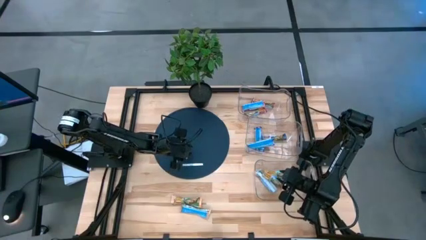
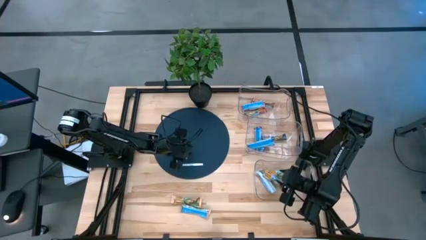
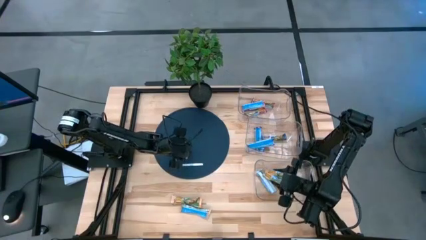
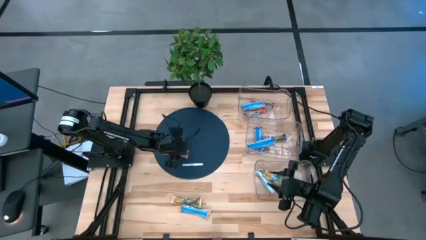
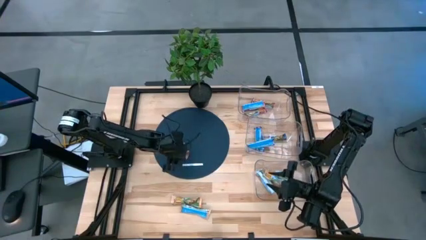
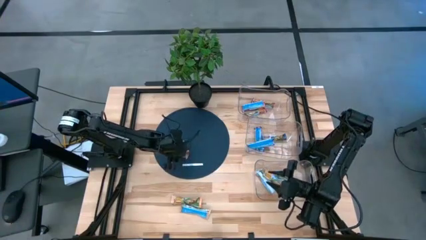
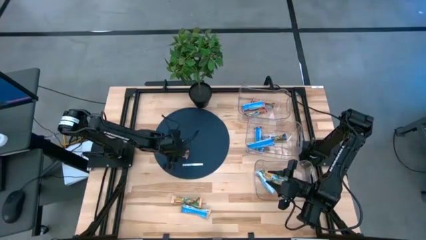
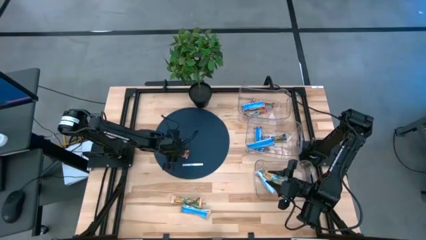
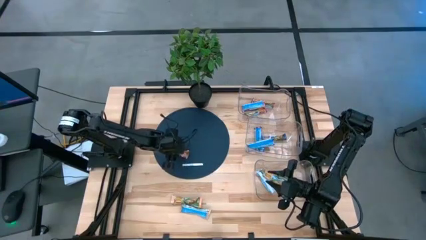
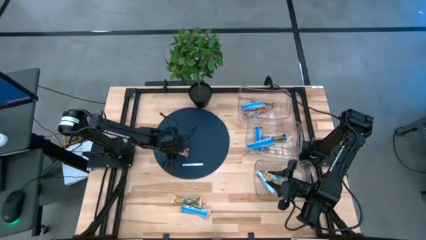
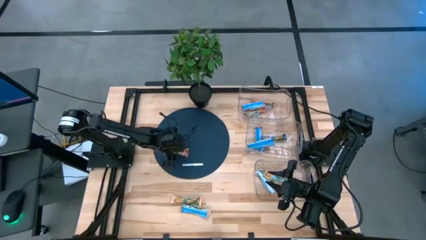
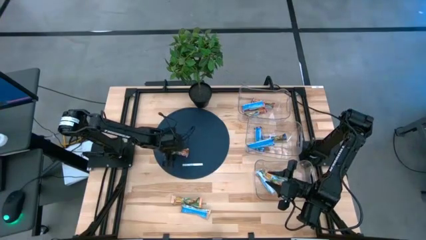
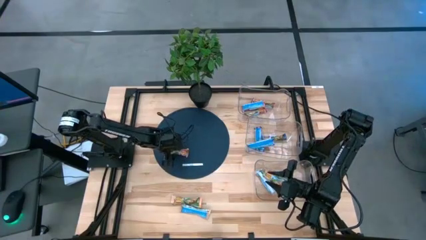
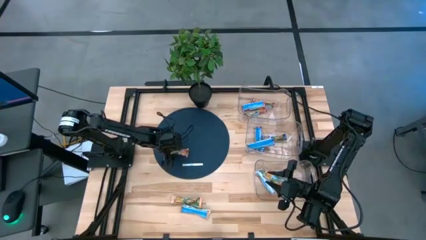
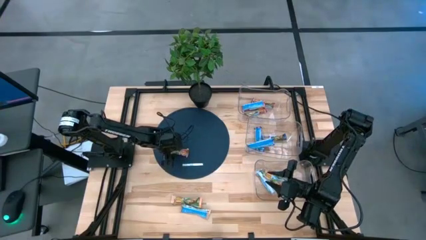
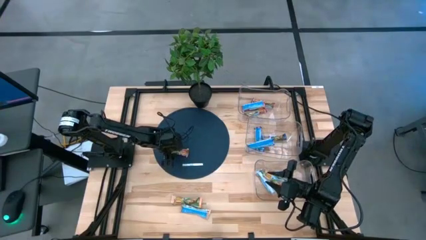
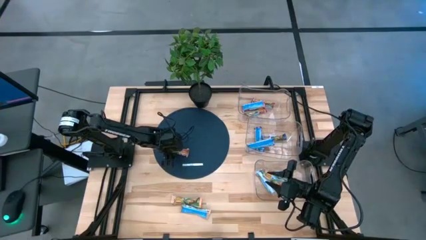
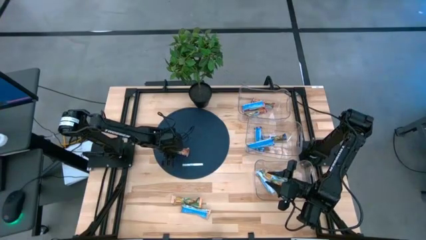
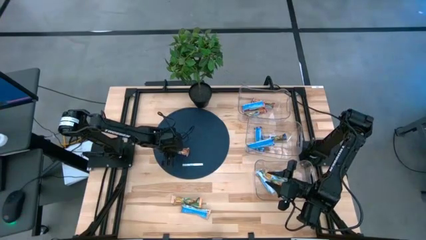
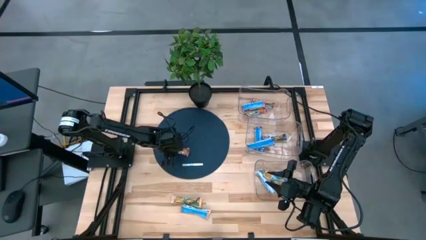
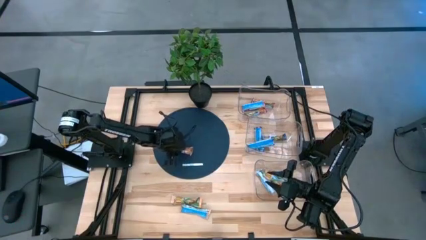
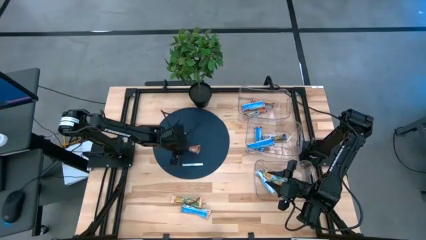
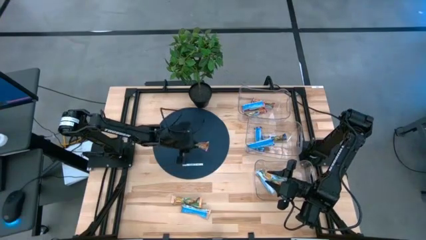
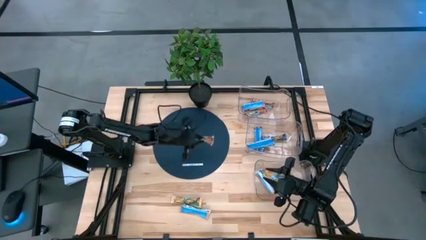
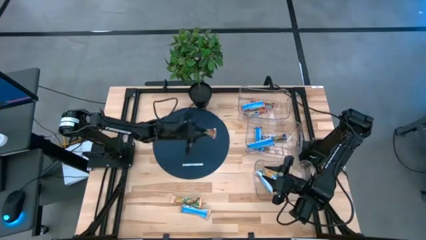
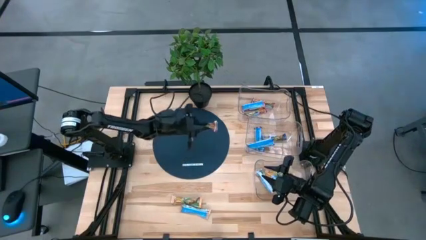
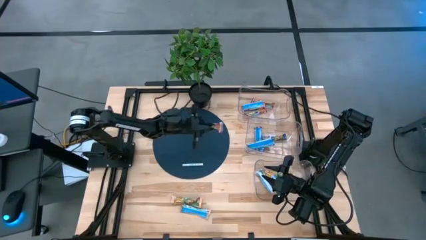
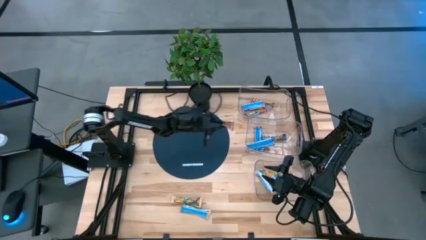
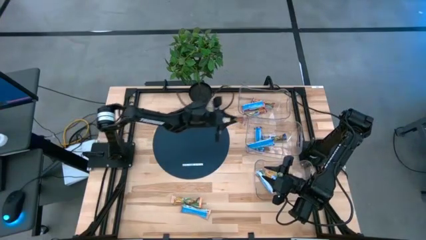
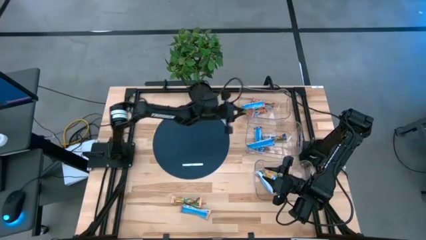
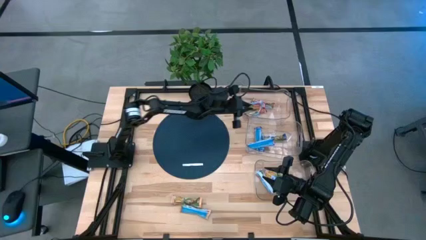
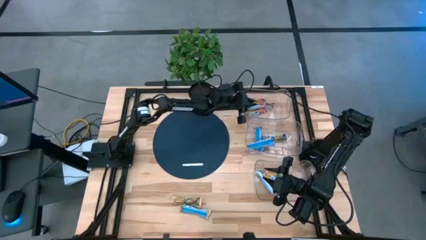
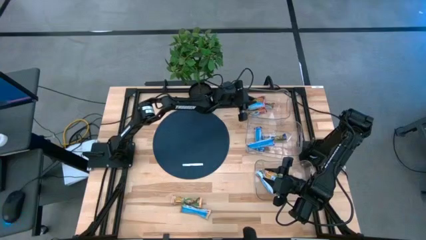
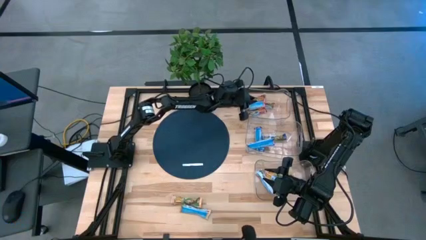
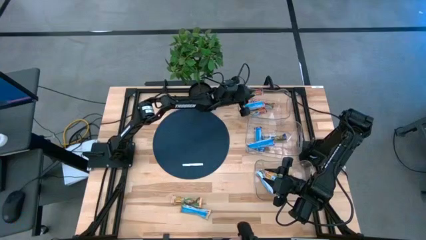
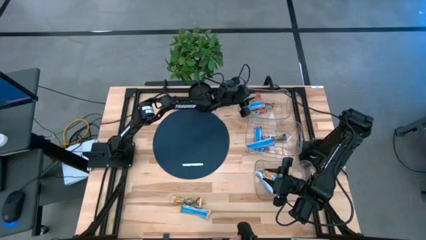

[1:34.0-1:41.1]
Task: Pick and place Granola Bars by type
Put the red granola bar into the top transparent bin

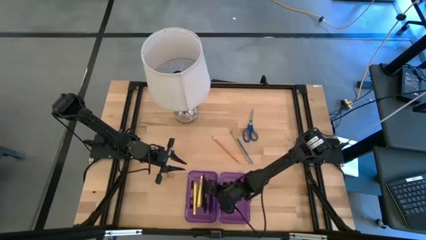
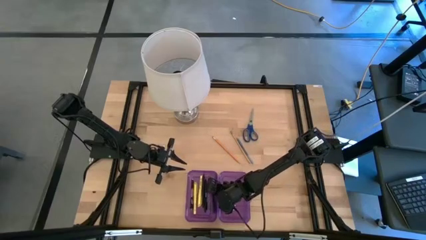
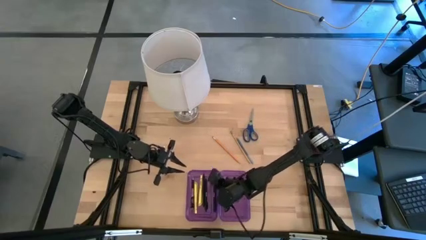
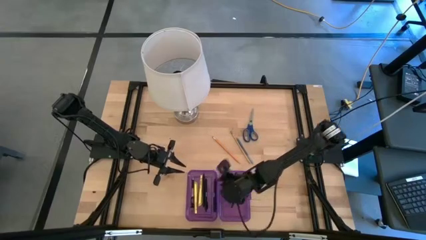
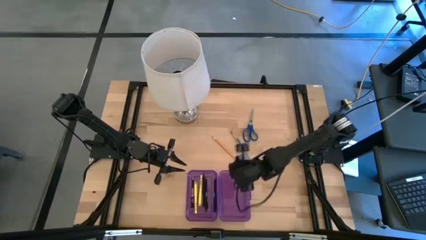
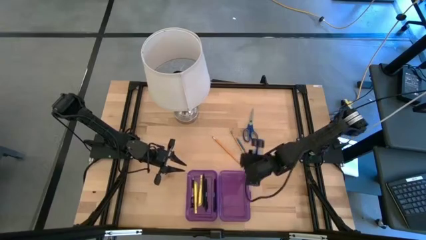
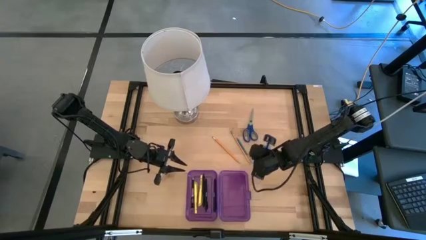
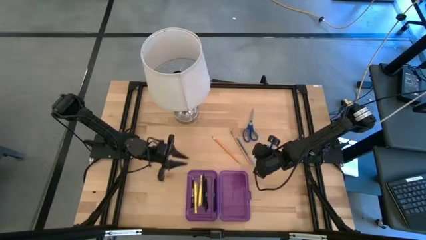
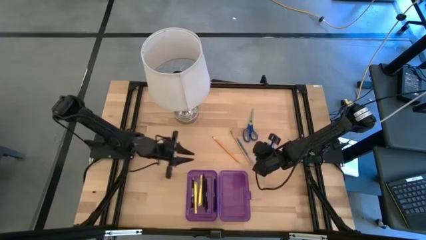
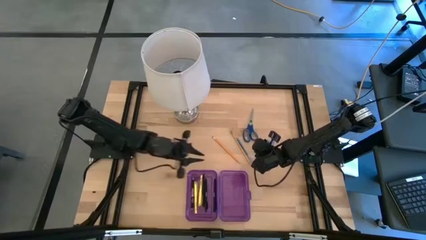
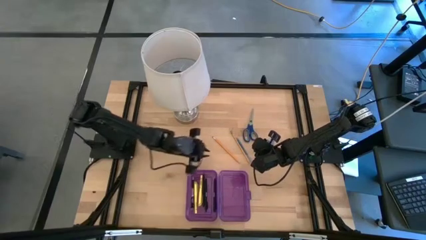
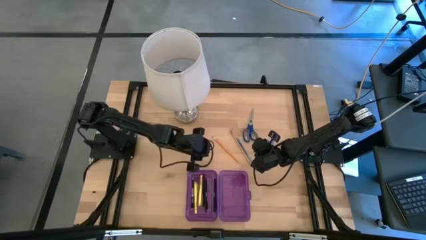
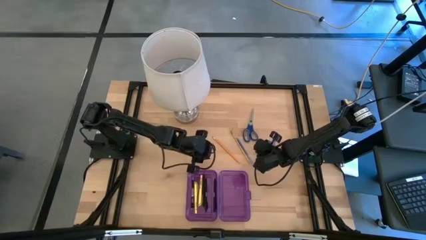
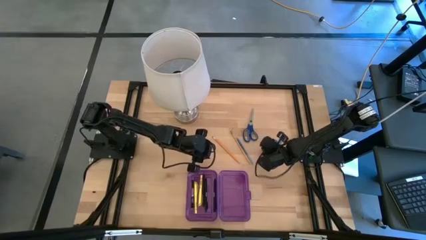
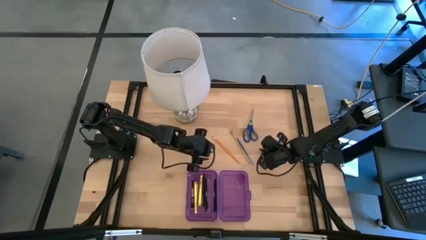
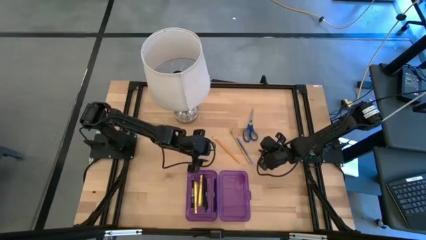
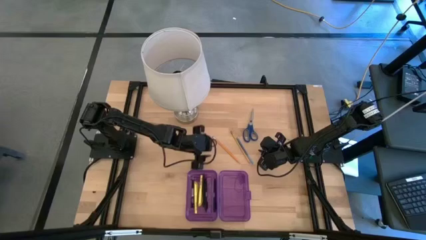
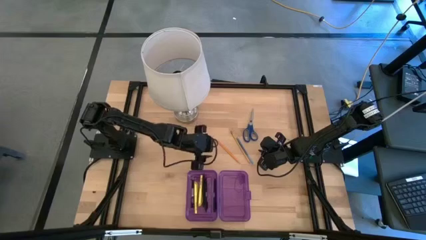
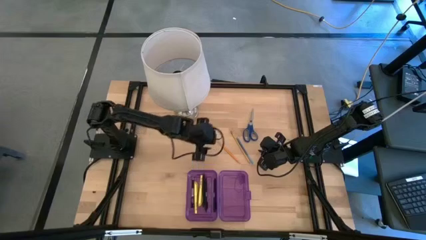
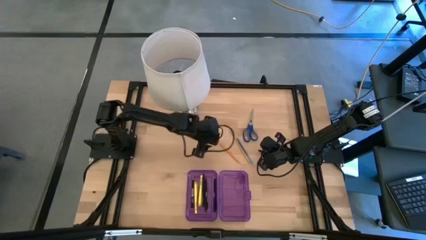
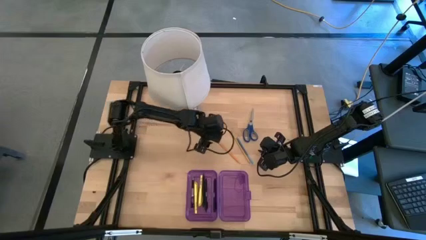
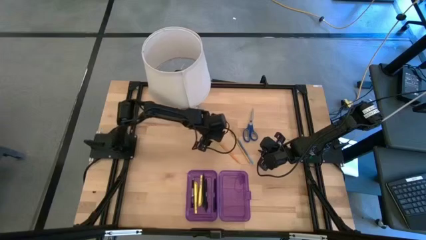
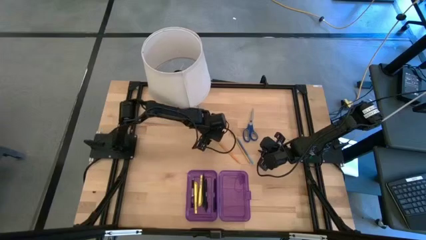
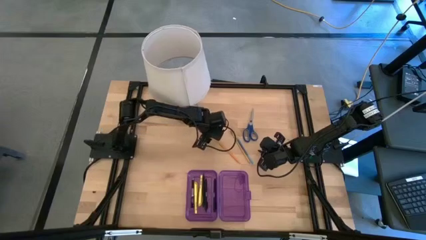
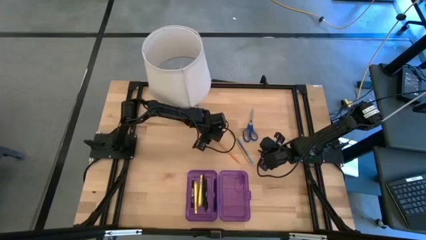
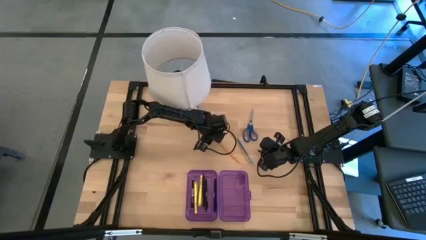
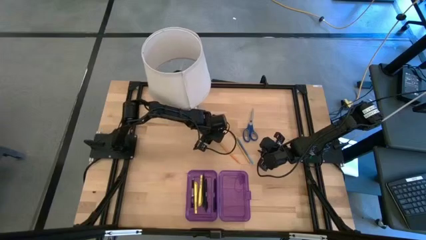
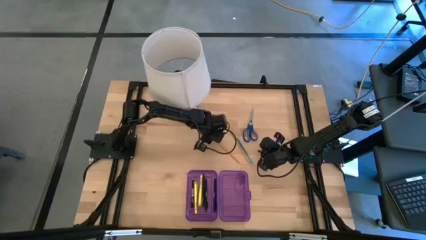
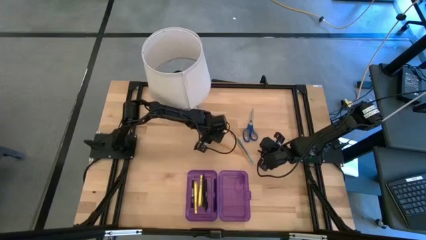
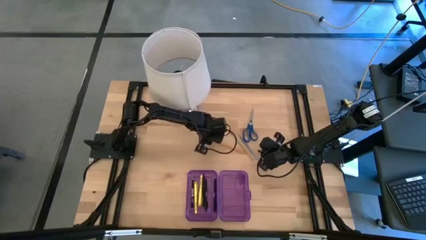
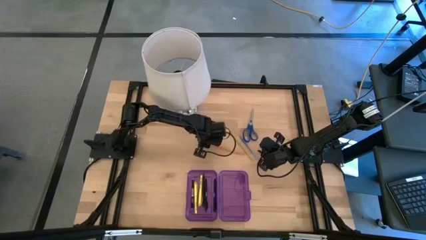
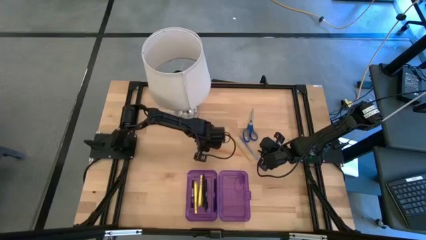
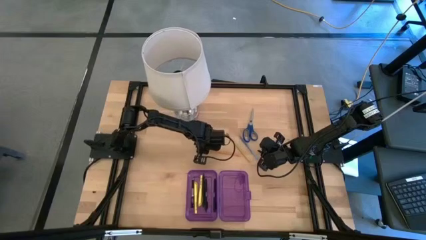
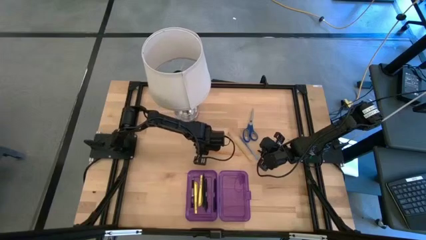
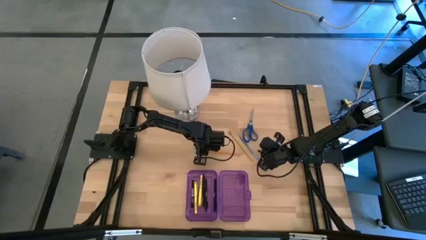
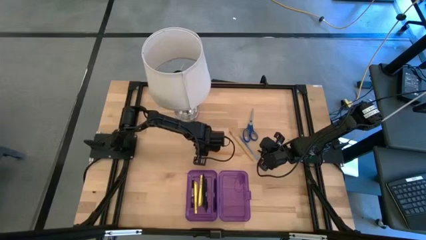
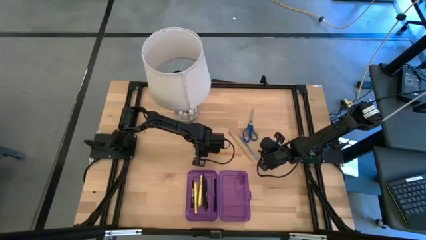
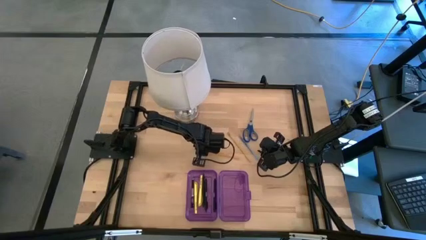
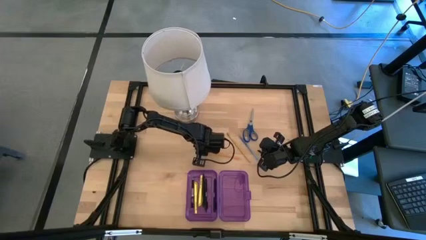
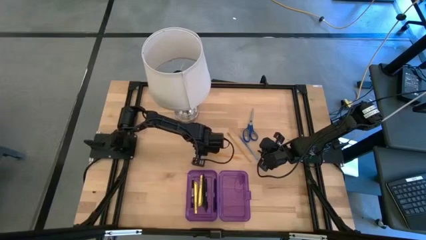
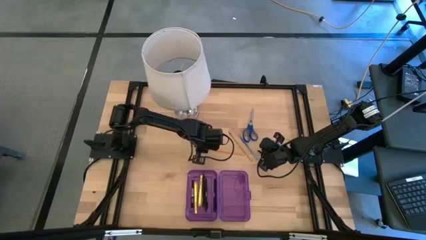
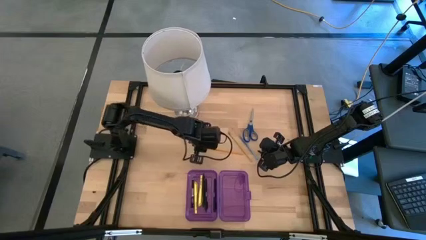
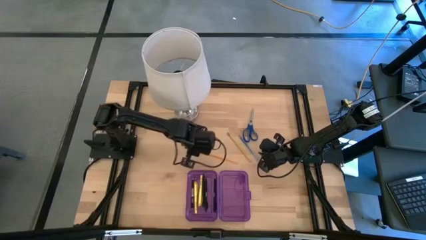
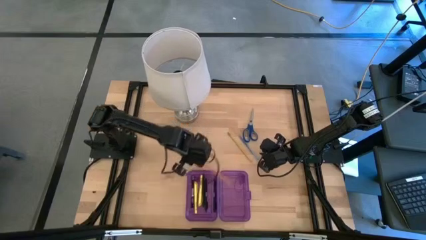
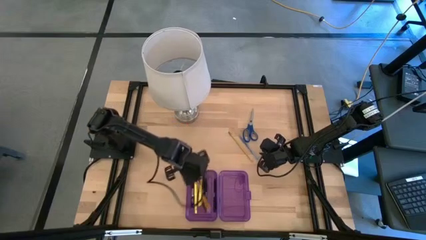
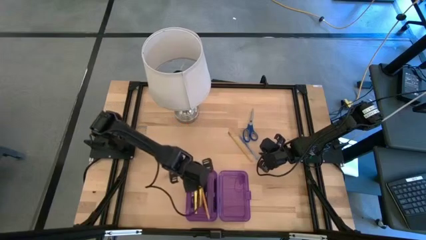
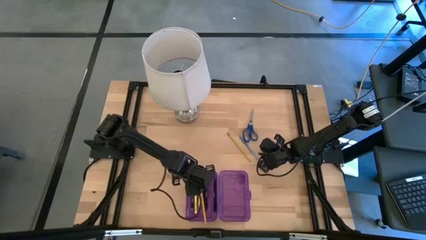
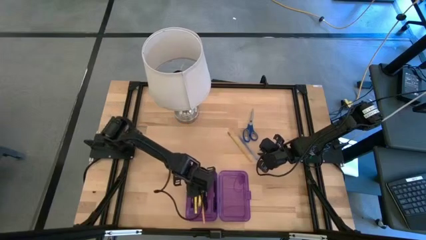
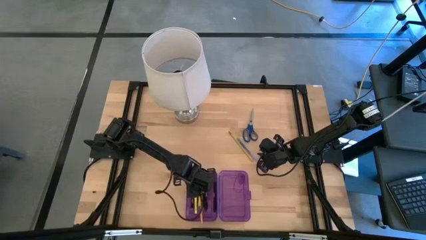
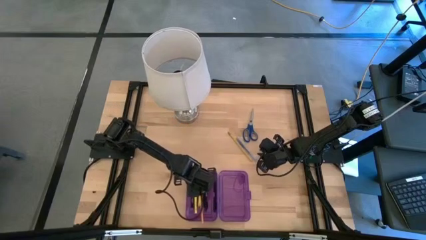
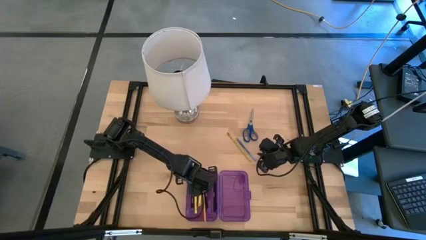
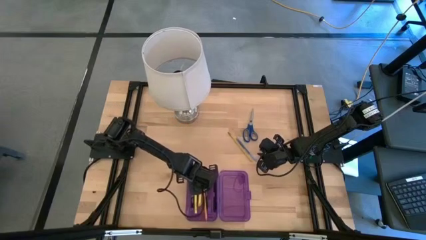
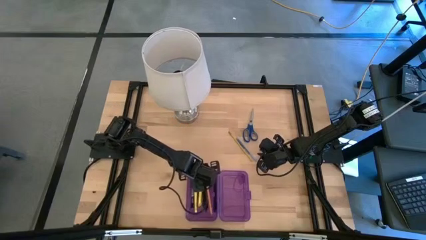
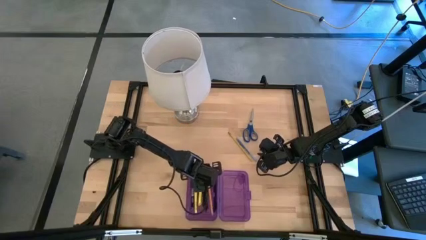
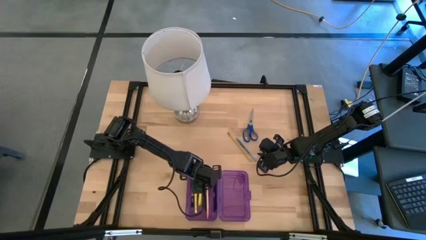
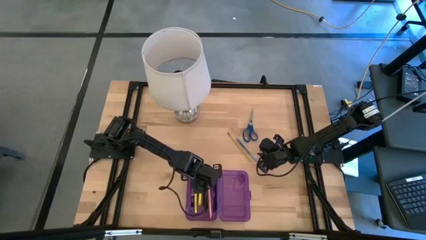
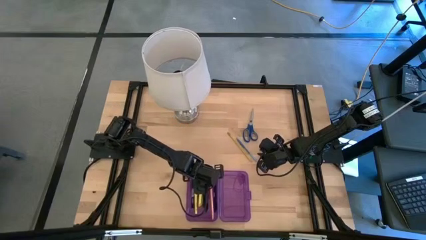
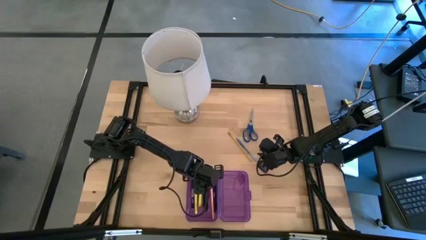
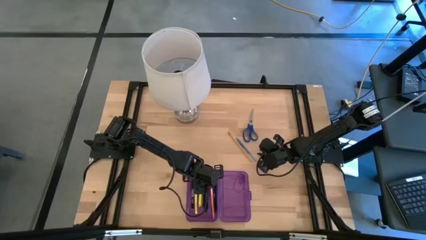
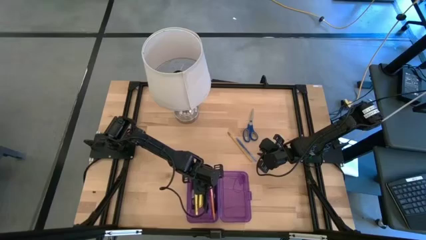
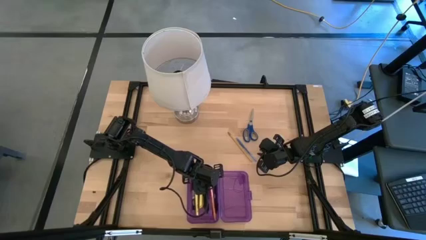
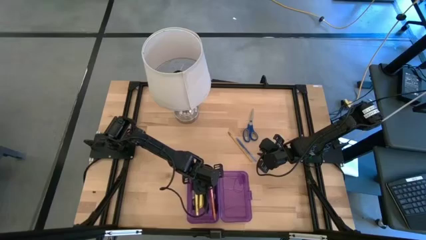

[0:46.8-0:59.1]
Task: Pick & place school supplies into a supply box
Put the orange pencil into the violet supply box
